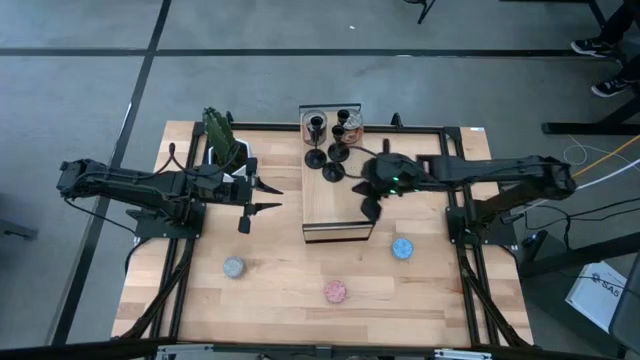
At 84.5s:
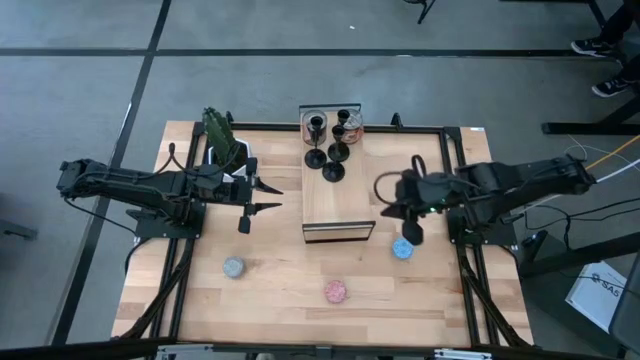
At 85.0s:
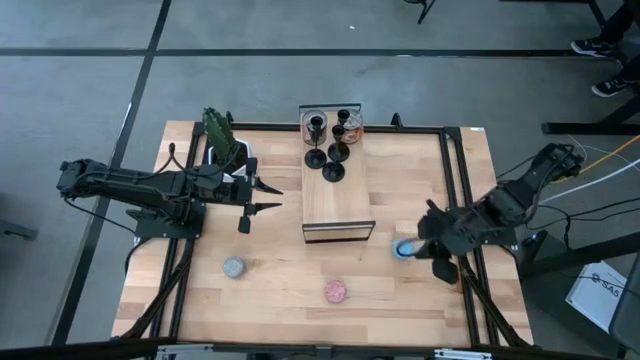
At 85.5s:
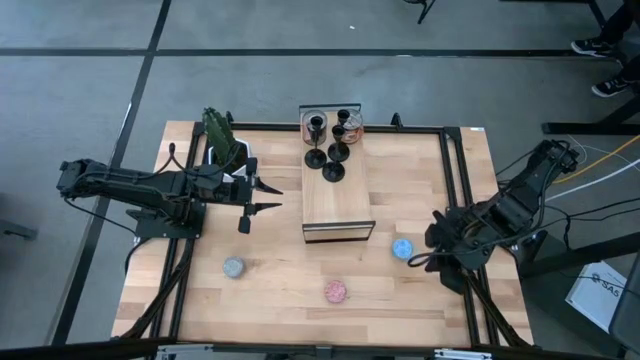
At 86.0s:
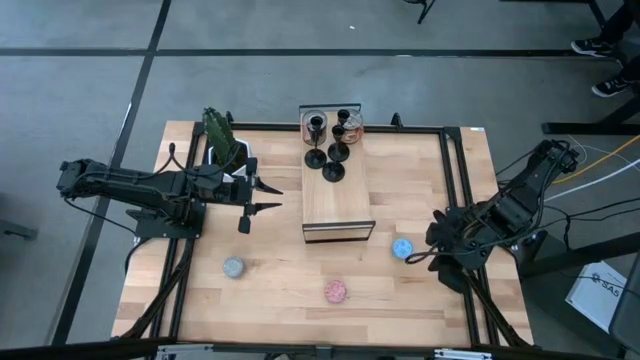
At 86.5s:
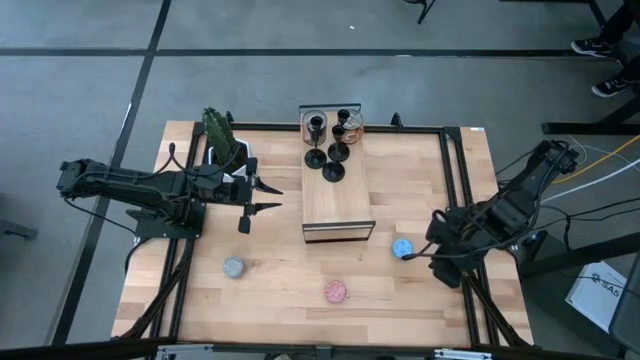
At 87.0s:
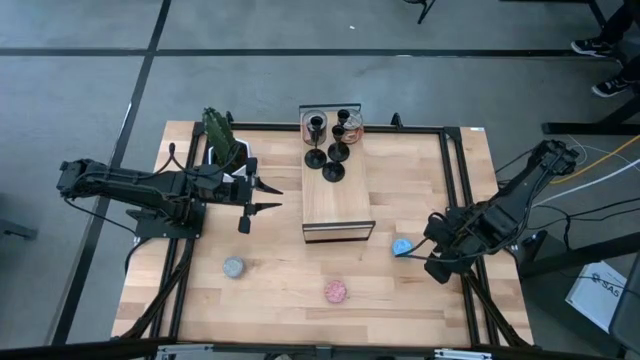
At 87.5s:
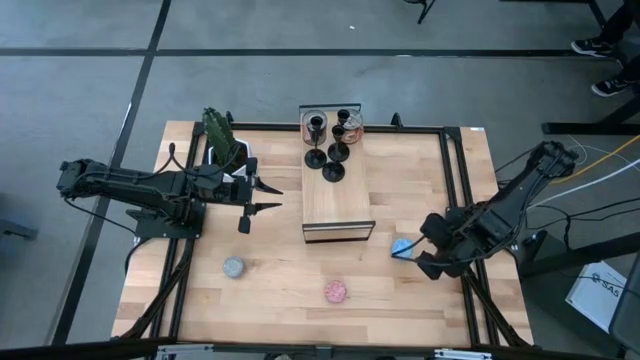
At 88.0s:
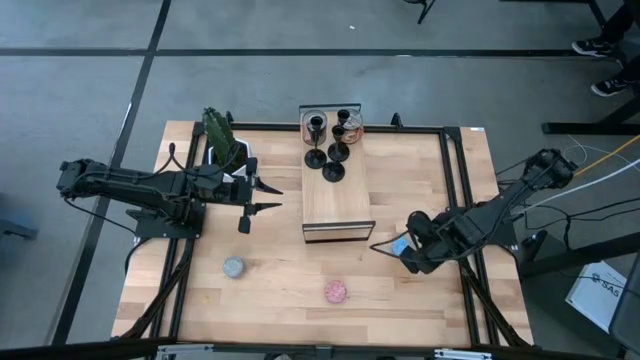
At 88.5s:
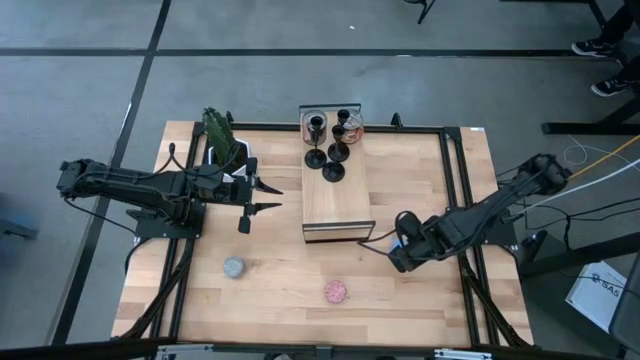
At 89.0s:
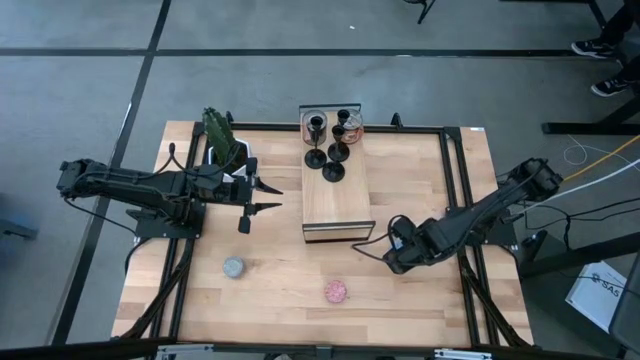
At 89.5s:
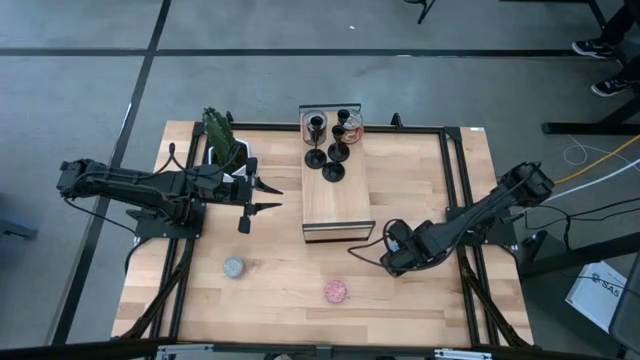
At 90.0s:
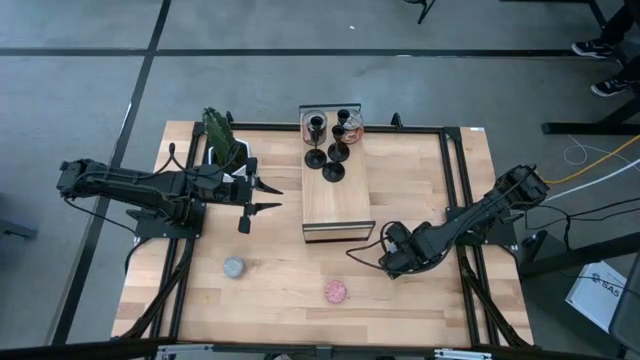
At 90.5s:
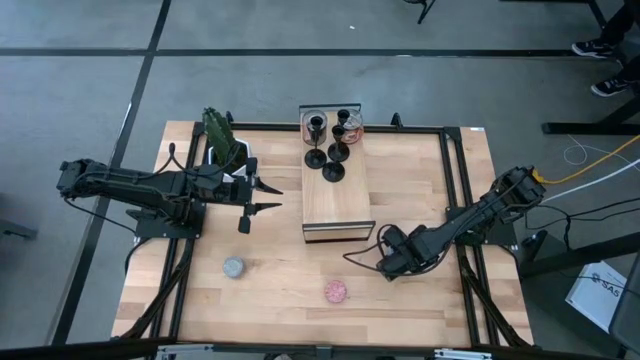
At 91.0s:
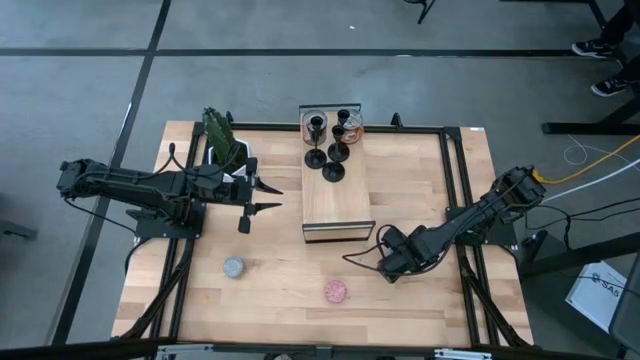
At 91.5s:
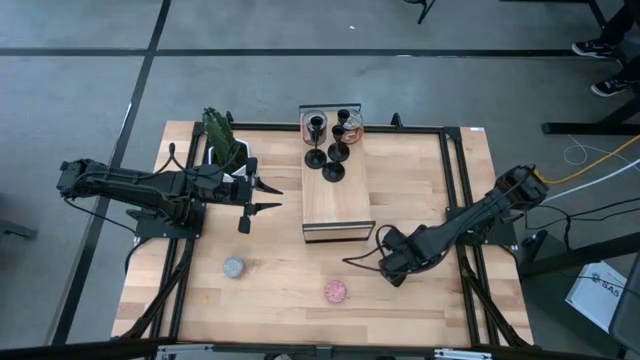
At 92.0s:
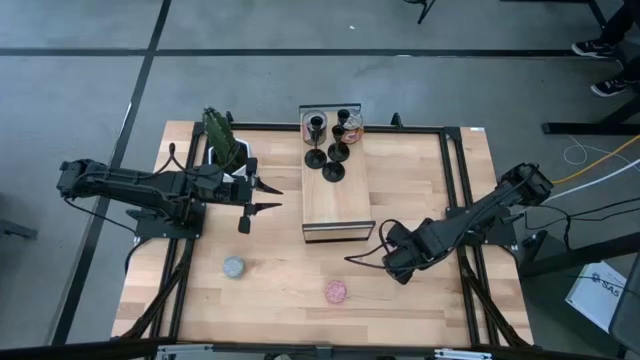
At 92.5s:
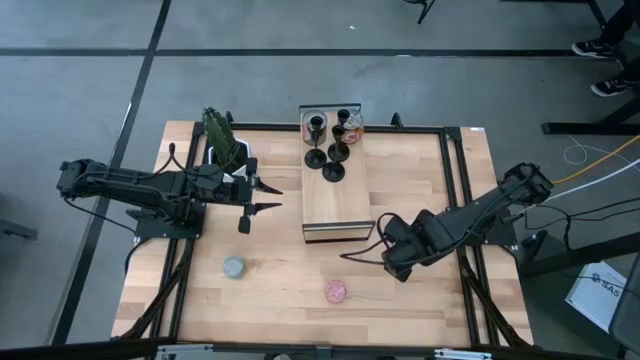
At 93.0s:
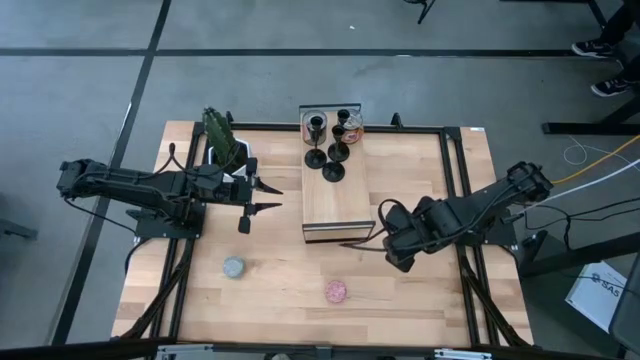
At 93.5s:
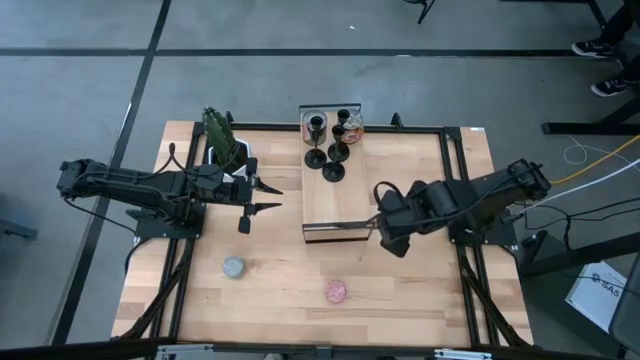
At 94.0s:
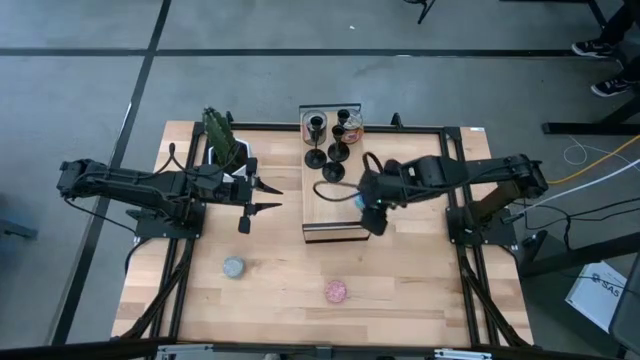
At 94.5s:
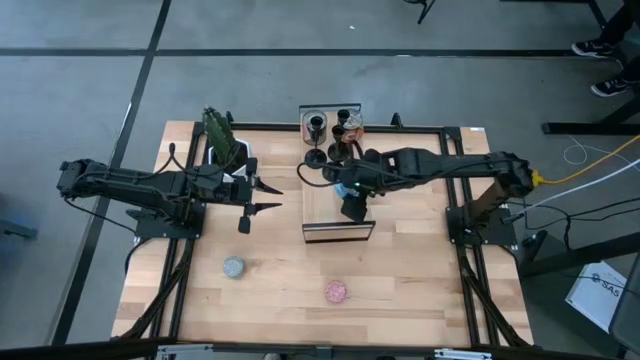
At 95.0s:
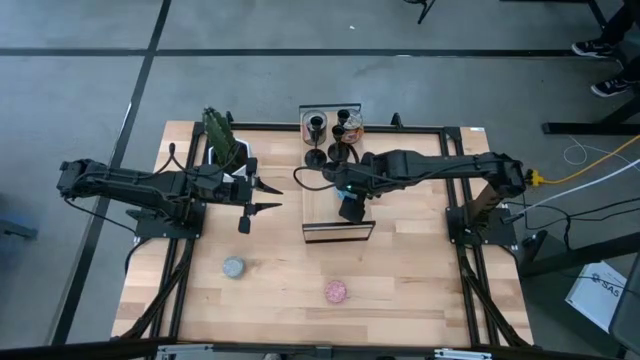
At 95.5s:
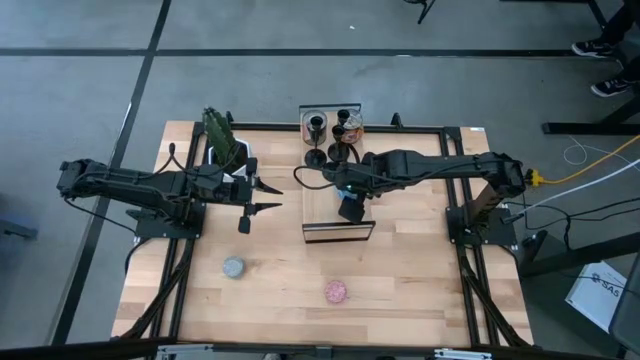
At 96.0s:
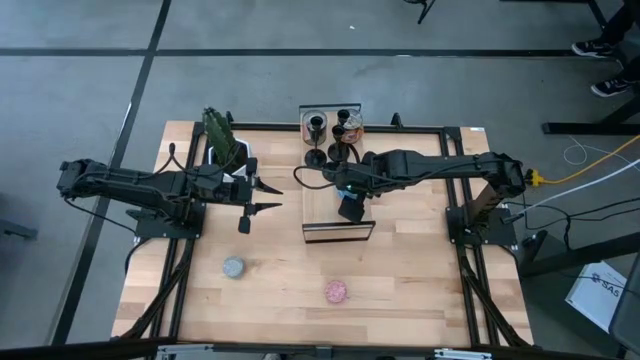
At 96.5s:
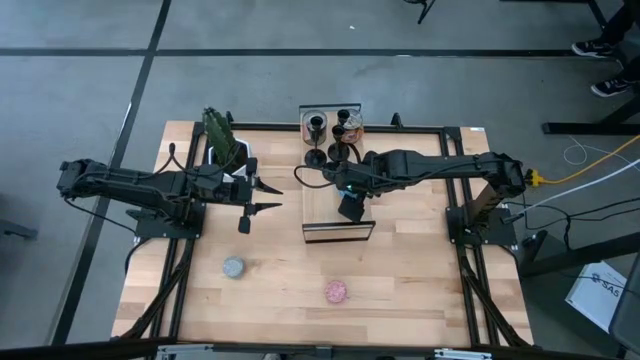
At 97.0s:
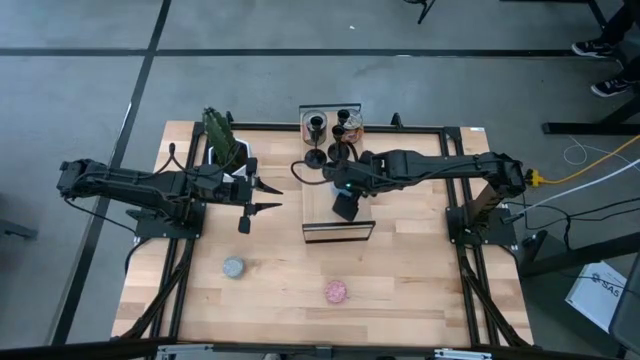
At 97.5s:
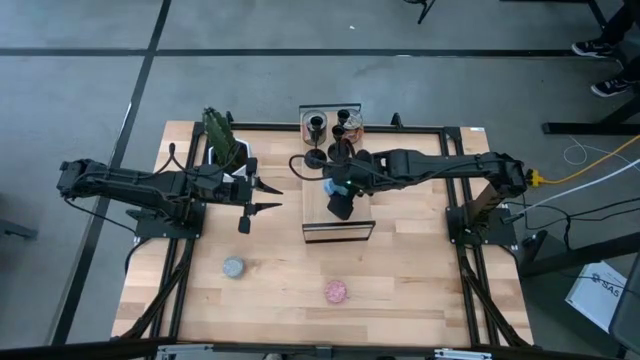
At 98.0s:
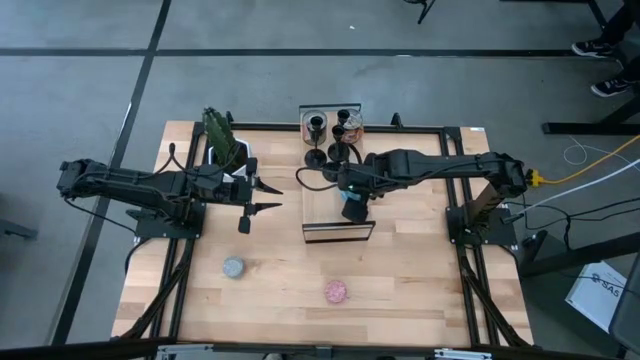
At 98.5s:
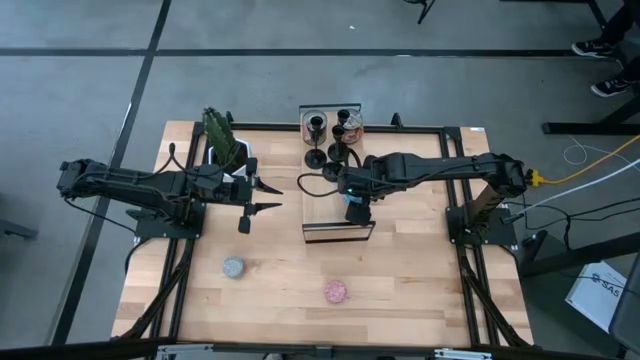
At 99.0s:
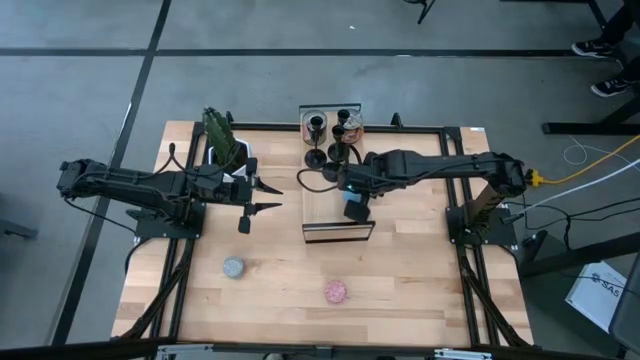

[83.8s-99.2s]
Task: Pick & Place candle stick holders
Put the small blue scented candle on the shelf

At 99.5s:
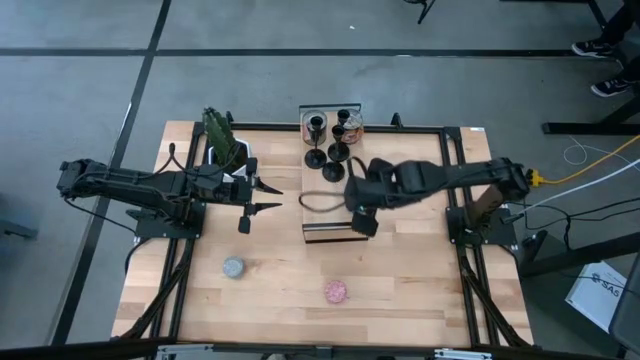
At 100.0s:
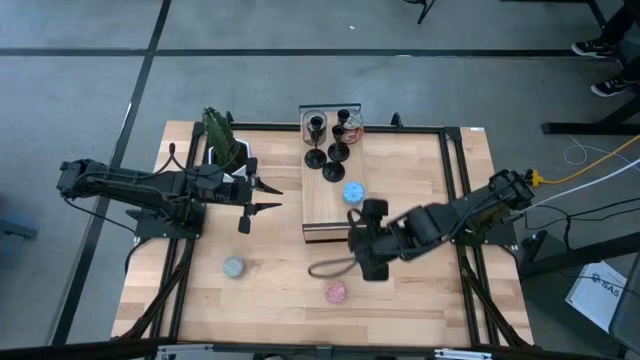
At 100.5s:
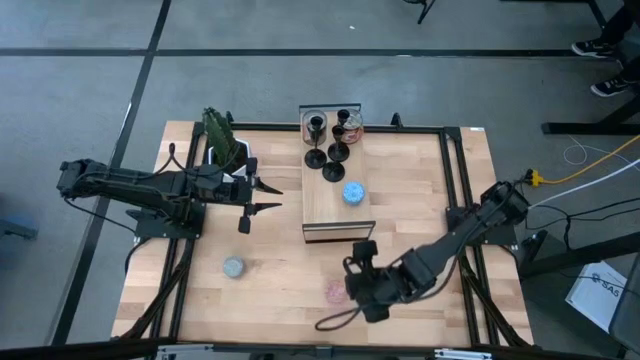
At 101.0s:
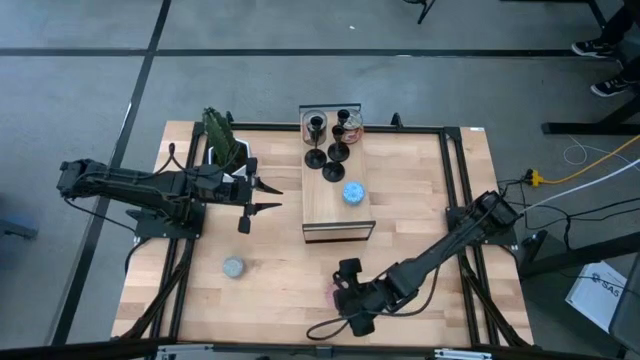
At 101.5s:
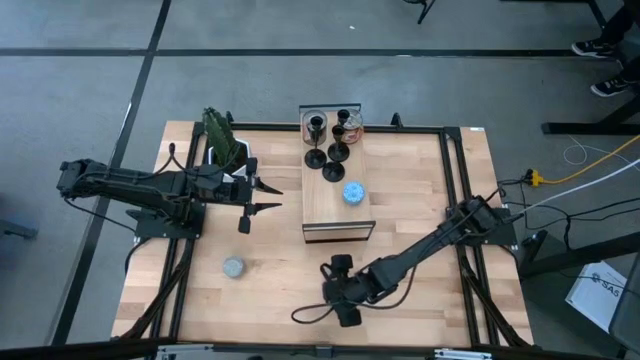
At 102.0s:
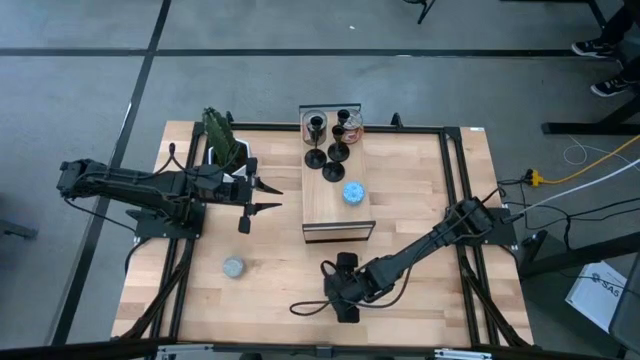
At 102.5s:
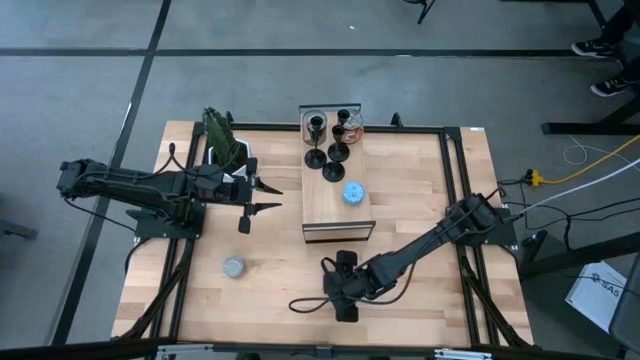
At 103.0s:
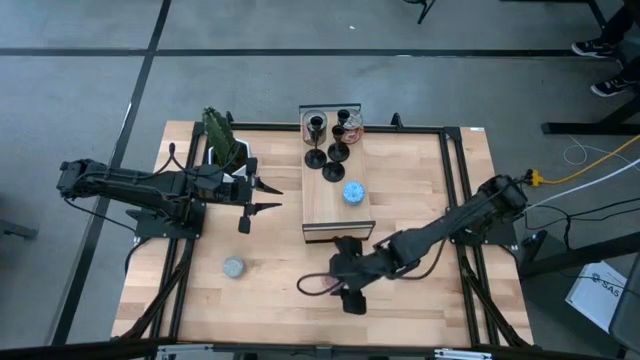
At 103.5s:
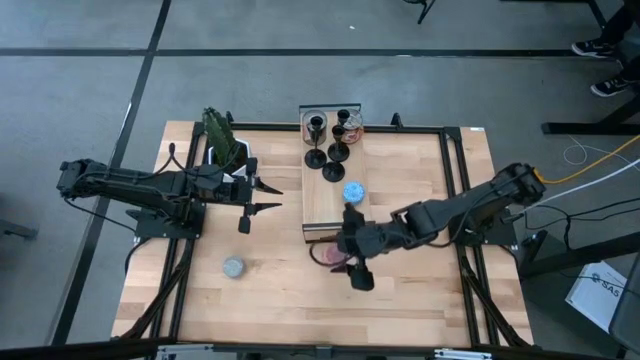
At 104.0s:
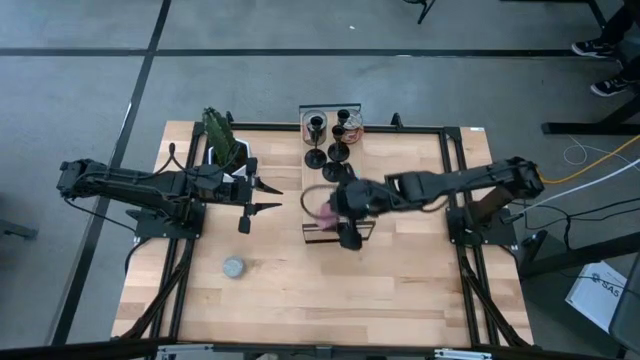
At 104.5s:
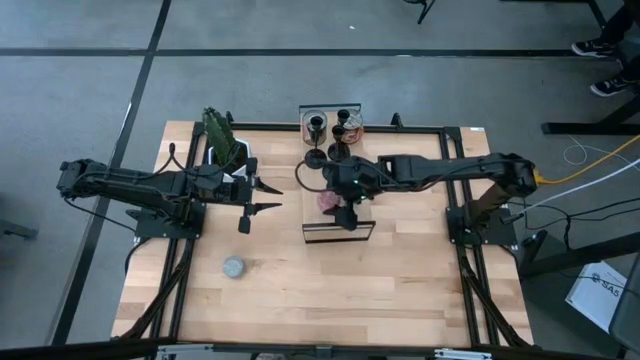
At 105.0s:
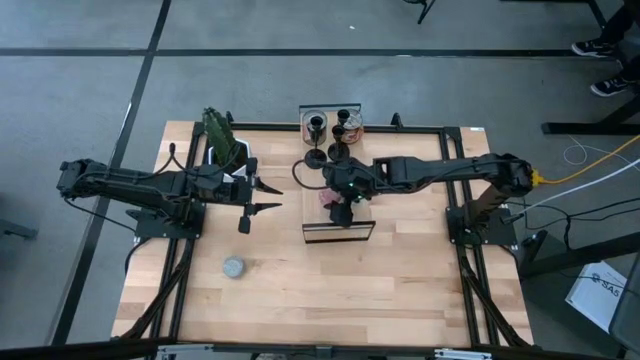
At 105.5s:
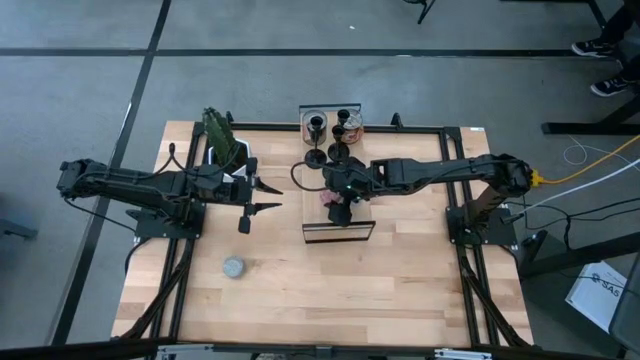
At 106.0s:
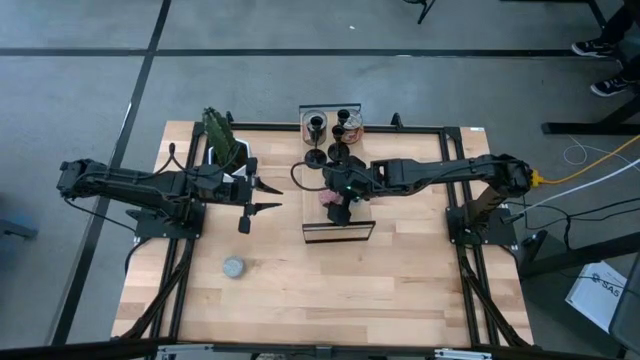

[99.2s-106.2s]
Put the small pink scented candle on the shelf
